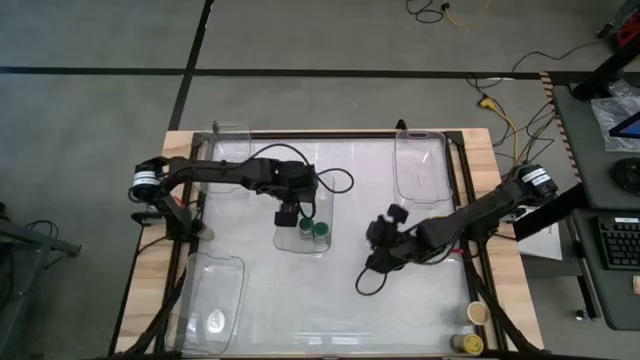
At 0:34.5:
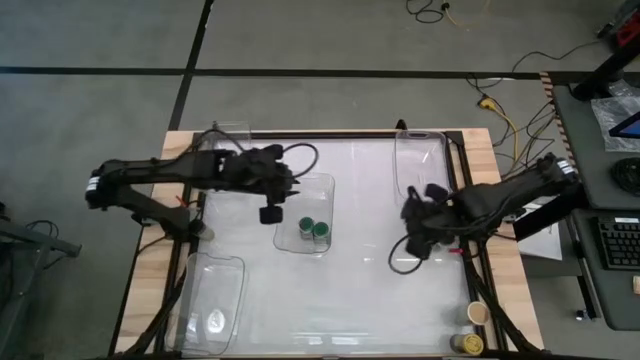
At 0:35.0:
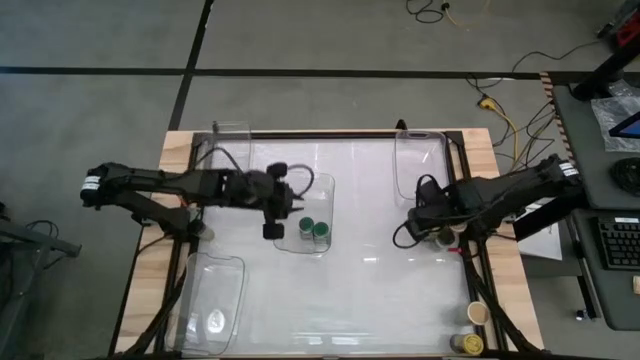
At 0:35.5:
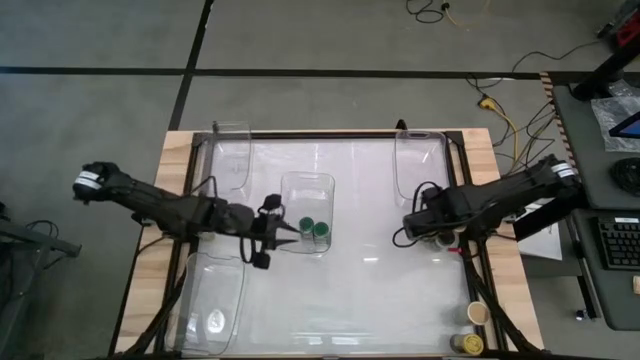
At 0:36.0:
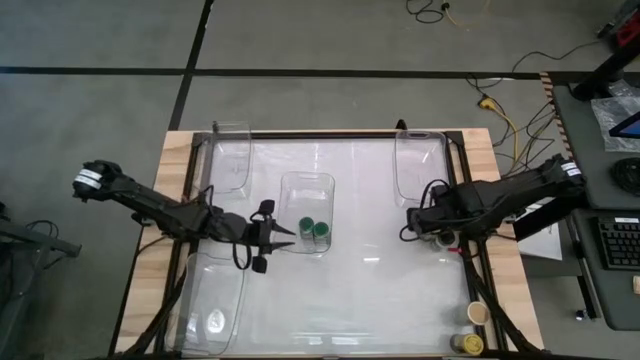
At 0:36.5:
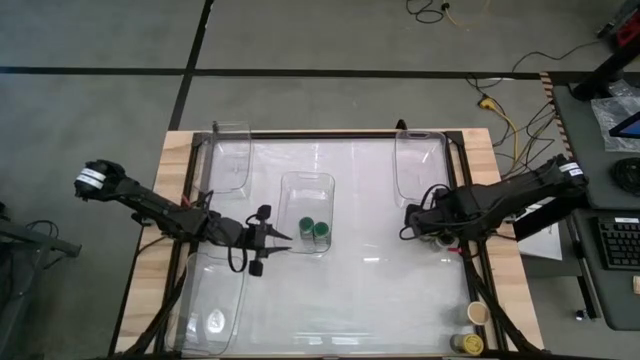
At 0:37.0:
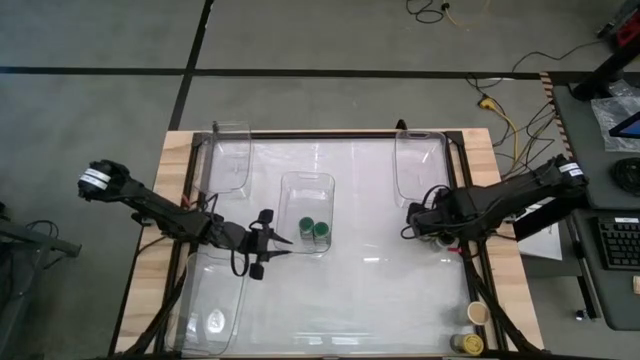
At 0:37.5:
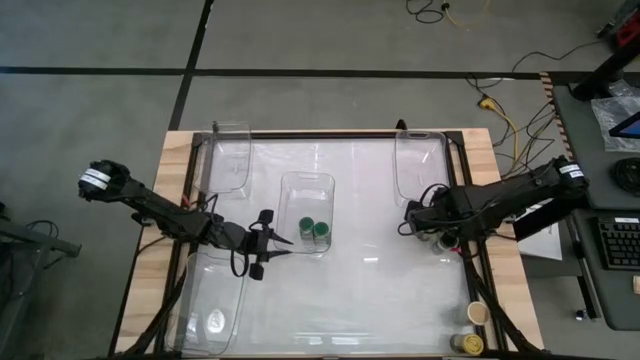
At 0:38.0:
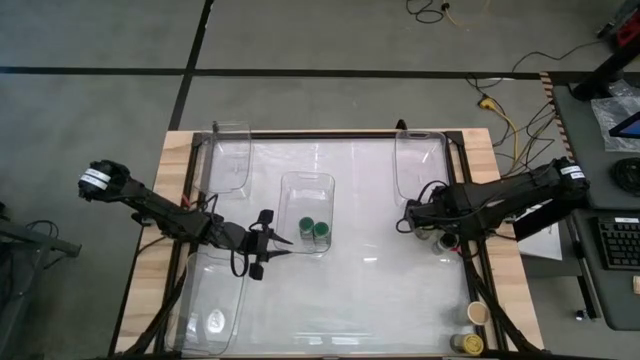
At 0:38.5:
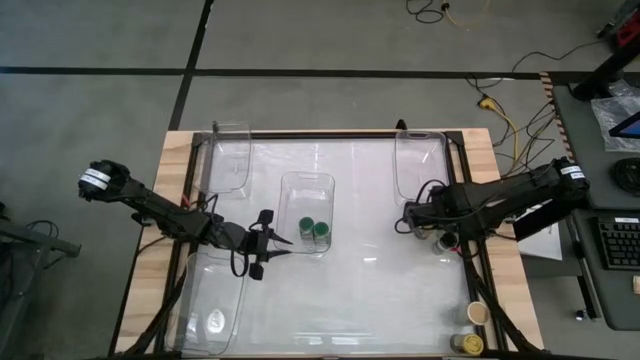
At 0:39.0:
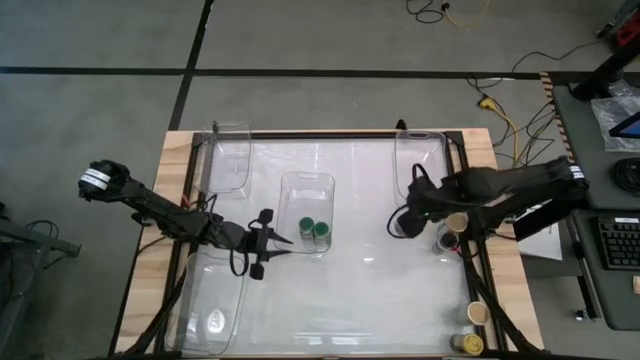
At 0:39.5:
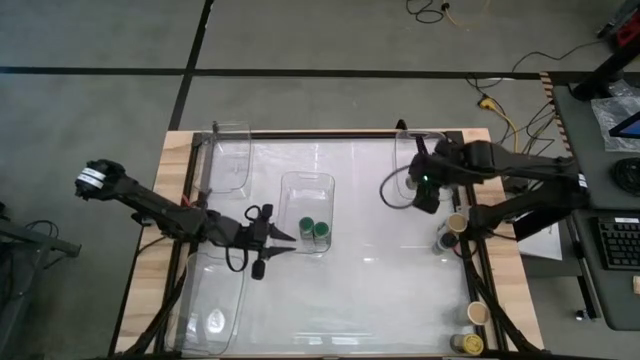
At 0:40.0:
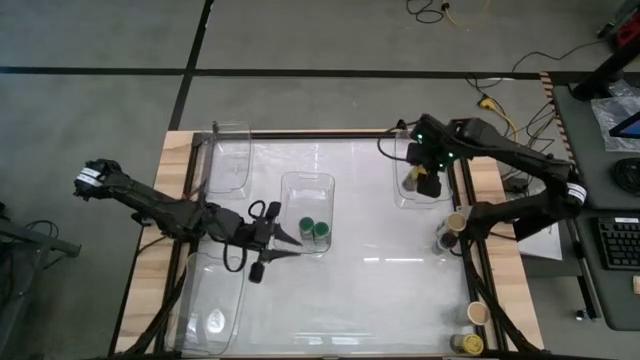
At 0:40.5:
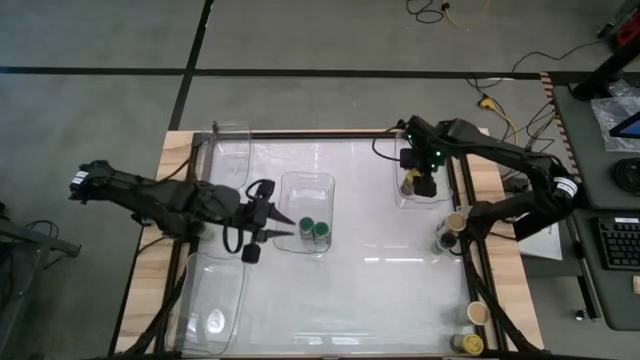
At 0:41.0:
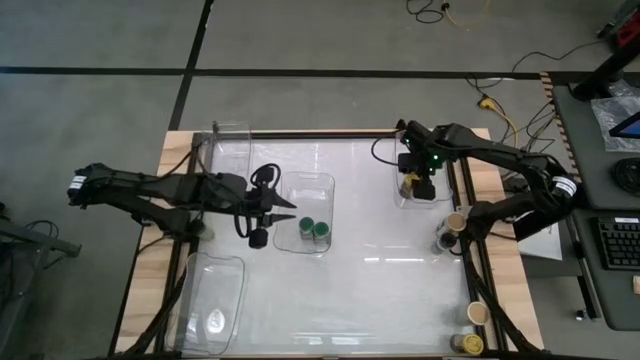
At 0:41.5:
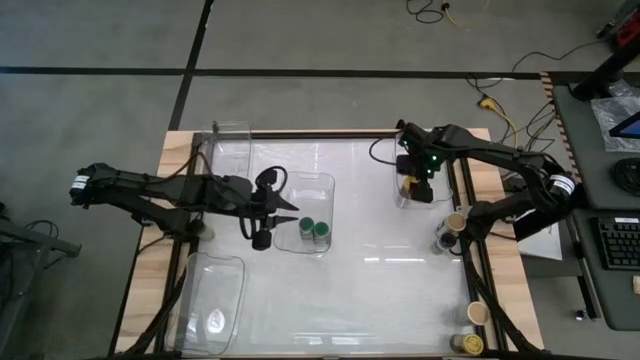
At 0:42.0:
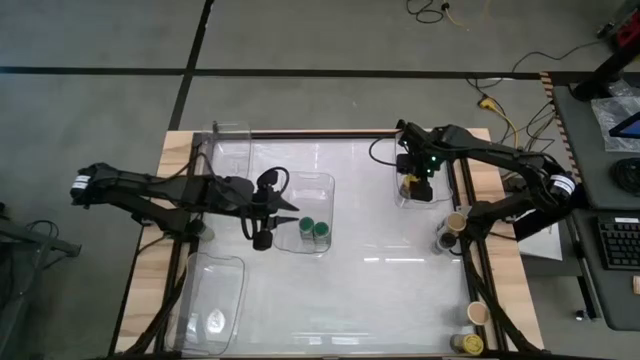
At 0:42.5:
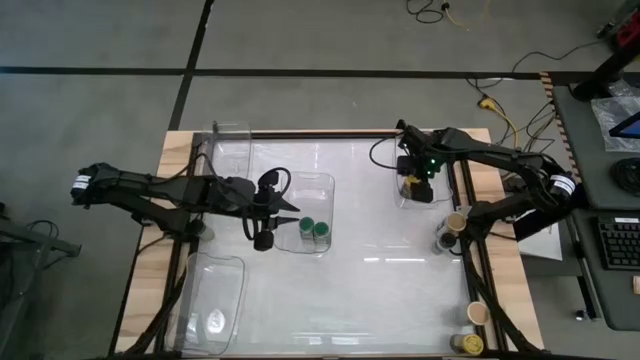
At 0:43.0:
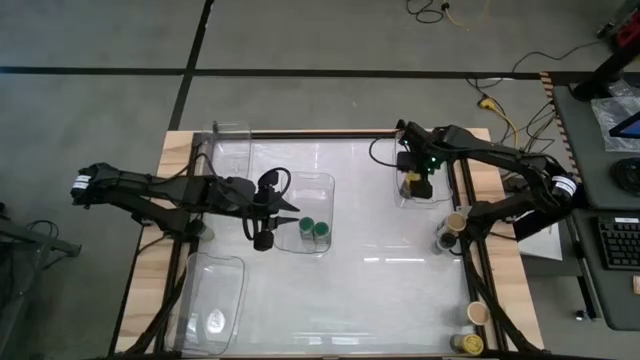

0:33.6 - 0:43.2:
Task: Sort spices by type
Put the top yellow seasoning bottle into the top right transparent bin

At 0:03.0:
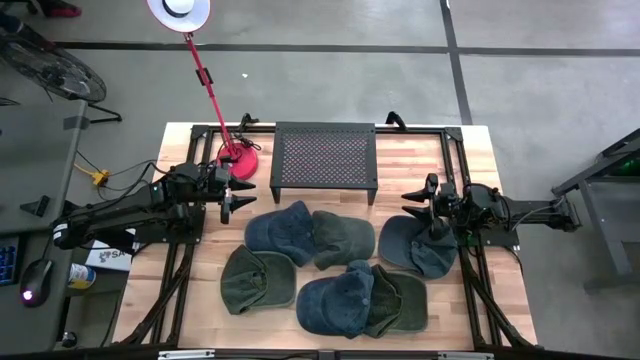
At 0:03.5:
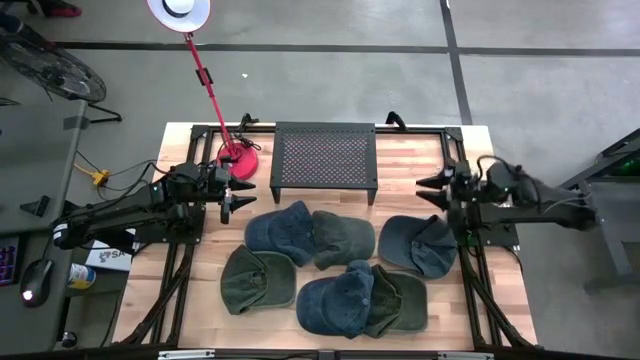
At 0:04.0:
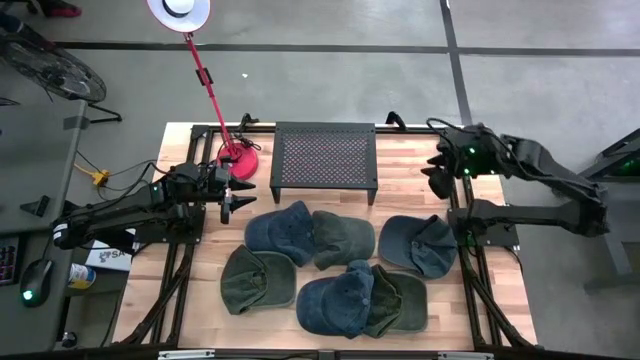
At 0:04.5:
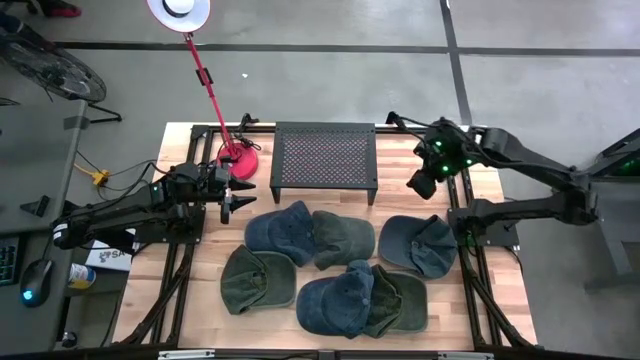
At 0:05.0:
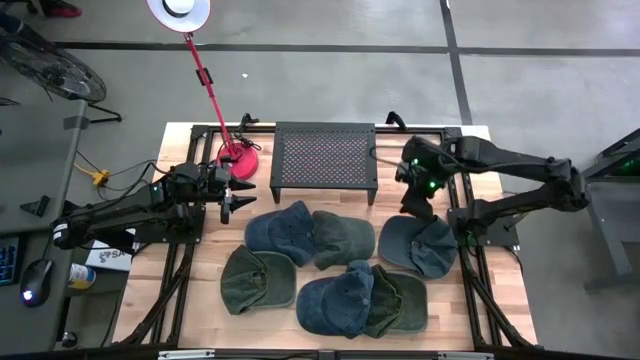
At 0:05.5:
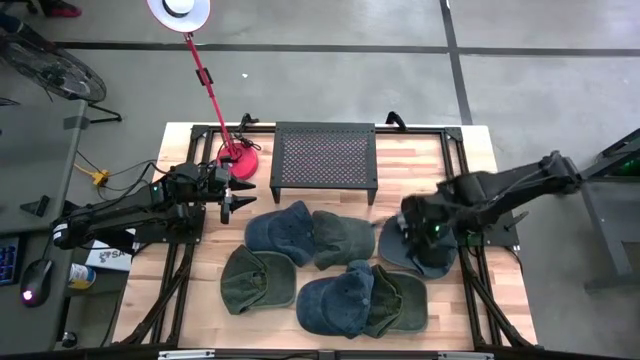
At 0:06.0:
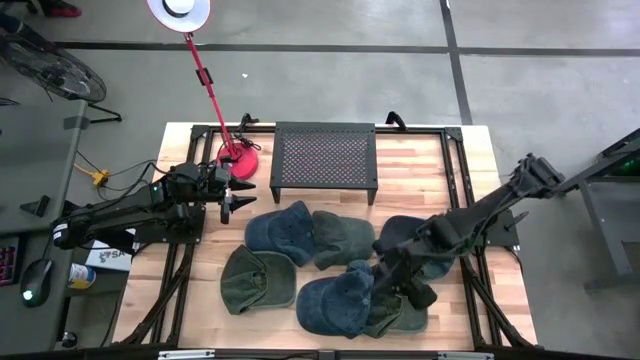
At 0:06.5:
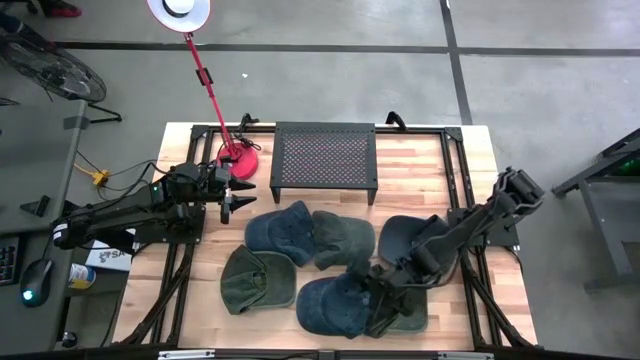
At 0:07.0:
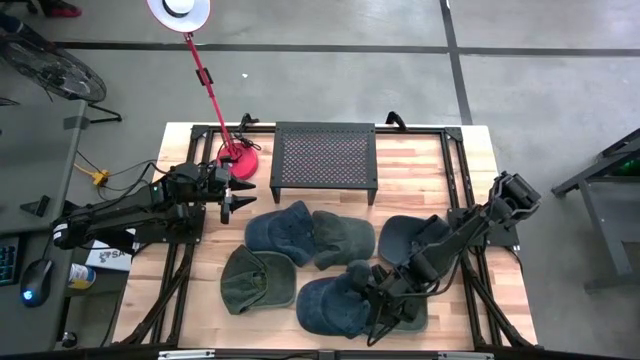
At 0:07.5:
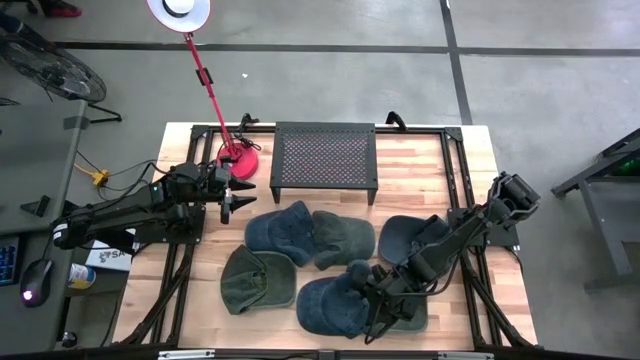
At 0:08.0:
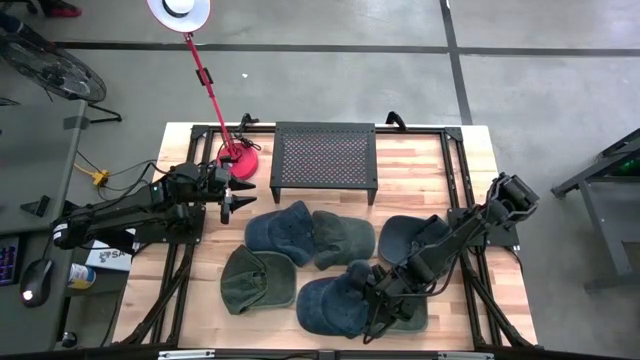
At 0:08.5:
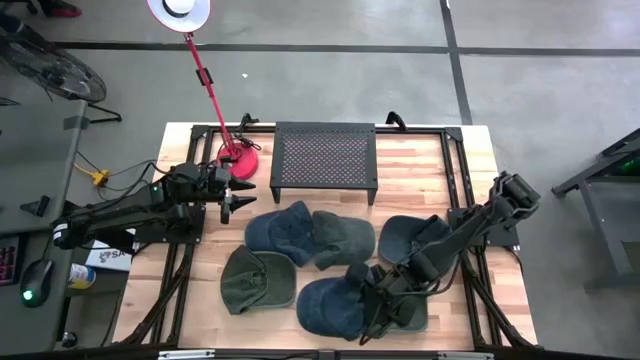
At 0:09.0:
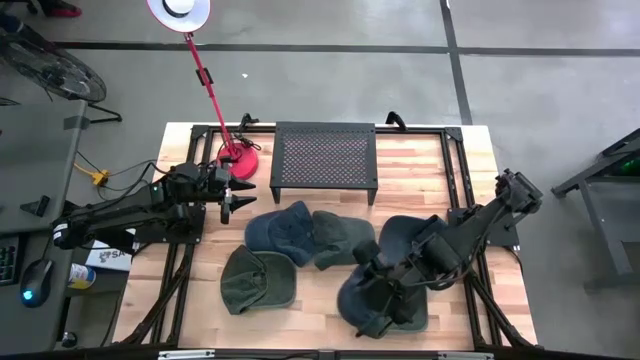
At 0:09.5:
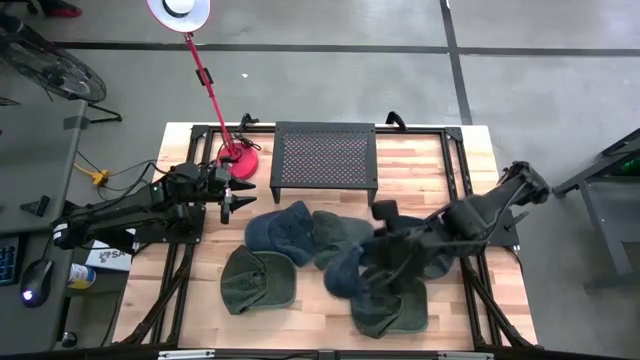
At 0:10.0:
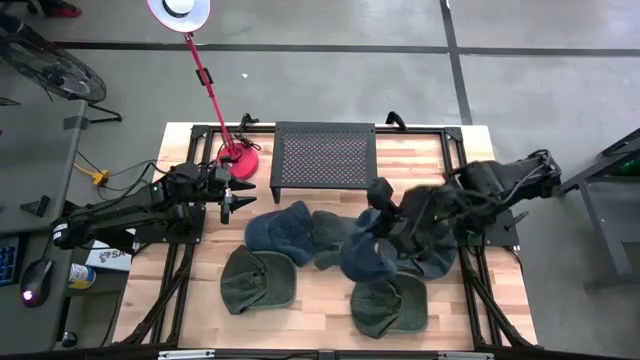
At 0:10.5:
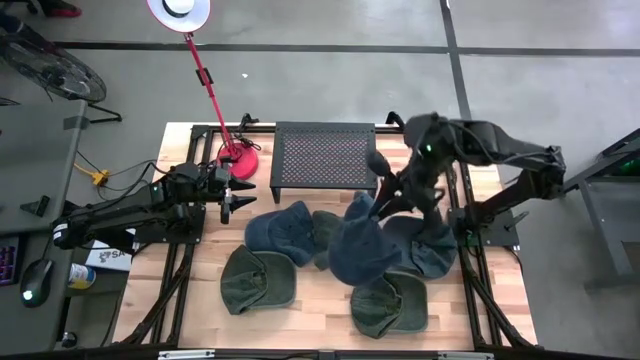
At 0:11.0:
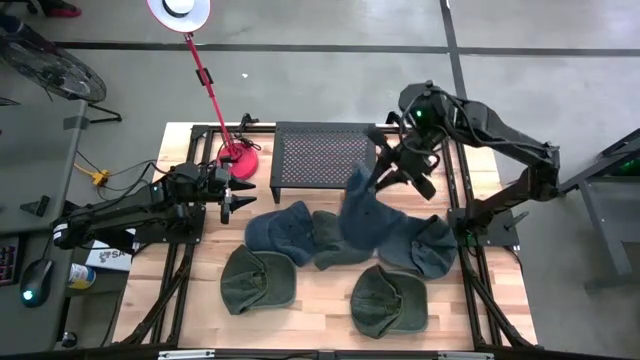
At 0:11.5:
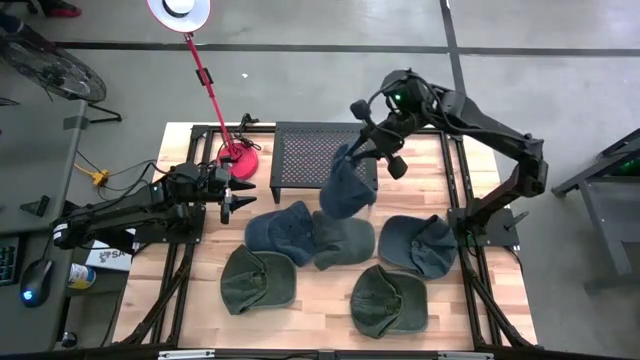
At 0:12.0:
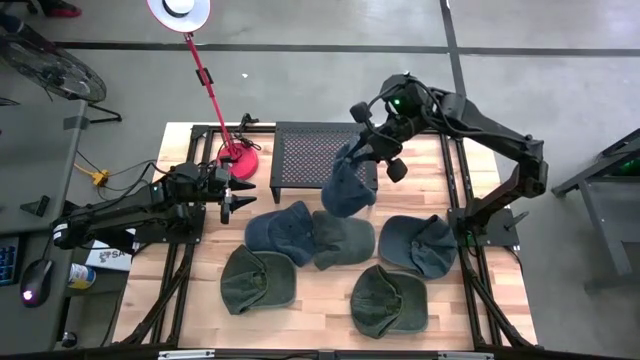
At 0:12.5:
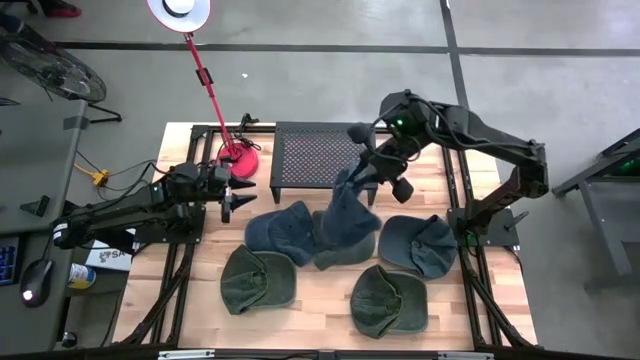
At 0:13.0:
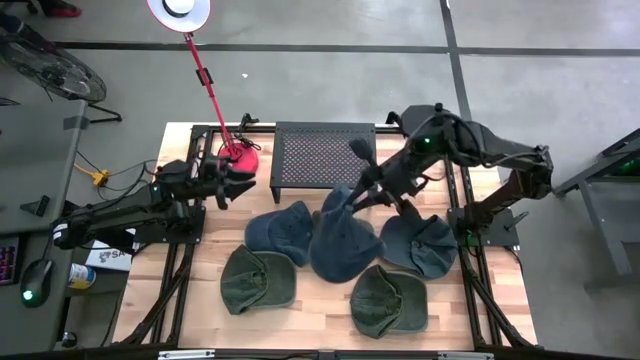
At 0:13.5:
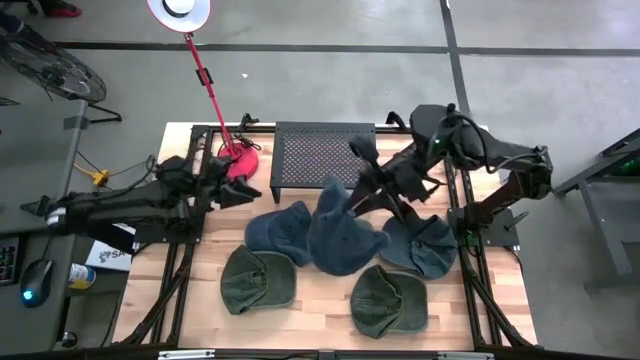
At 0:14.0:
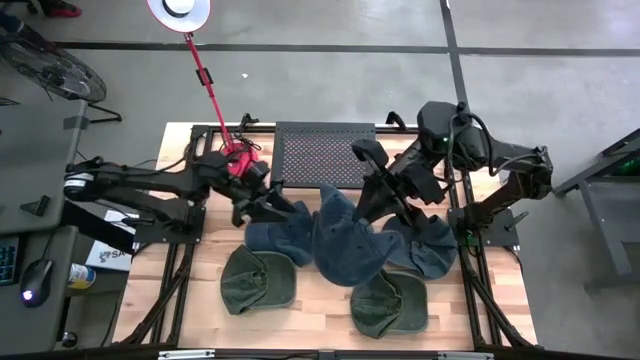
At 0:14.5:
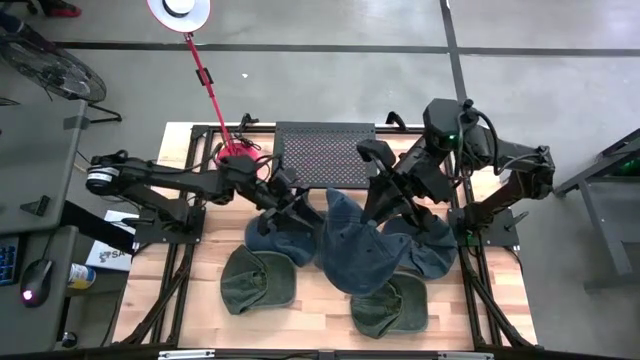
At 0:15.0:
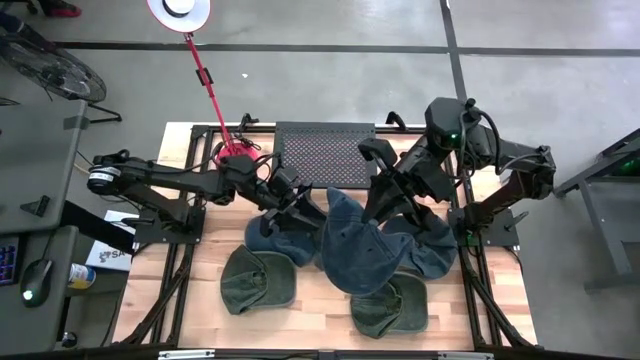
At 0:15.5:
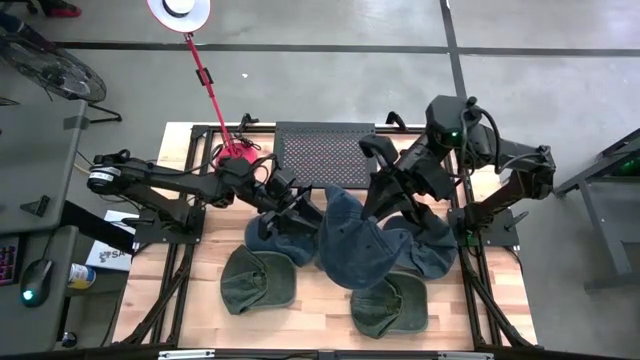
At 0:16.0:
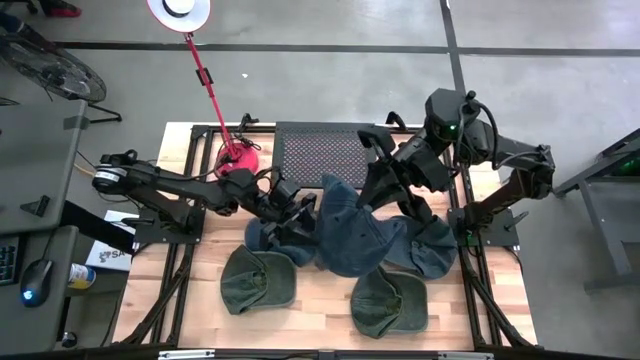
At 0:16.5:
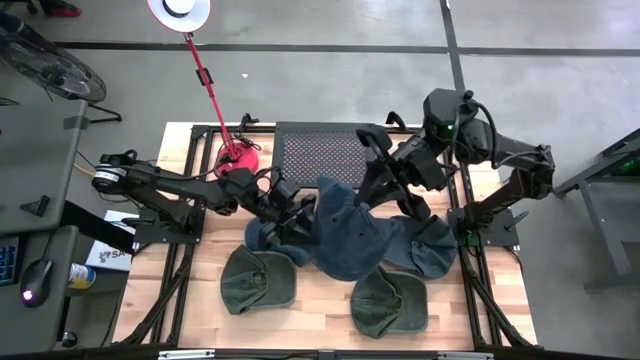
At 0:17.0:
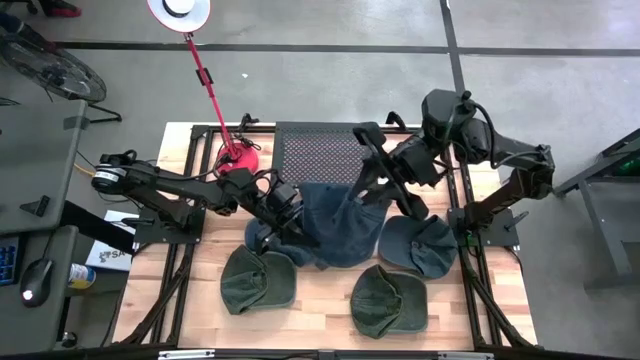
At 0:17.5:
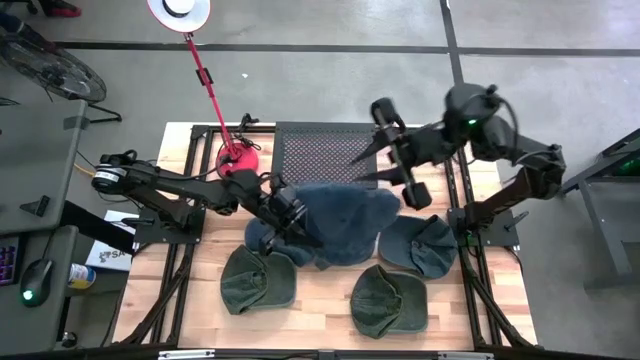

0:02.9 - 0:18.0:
Task: Pick & Place hat
Put the bottom blue cap to the right on the shelf
